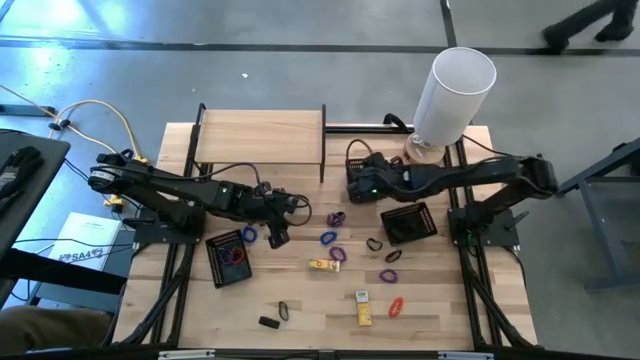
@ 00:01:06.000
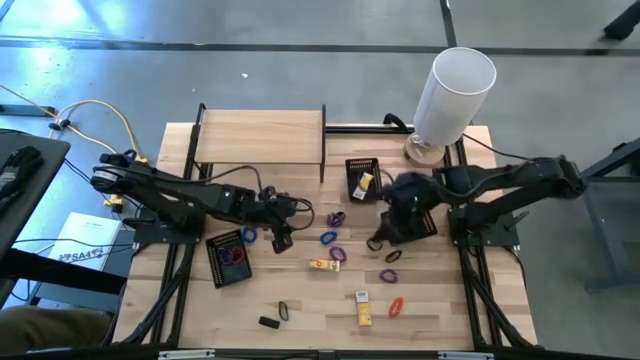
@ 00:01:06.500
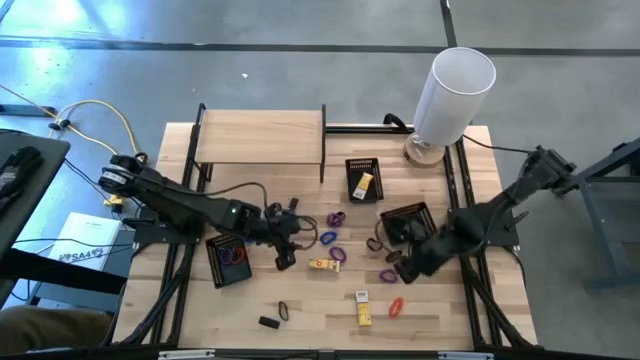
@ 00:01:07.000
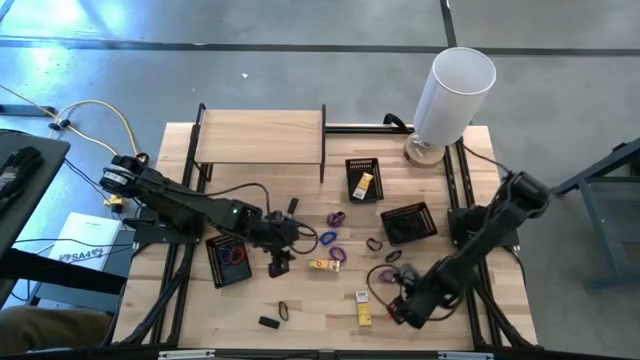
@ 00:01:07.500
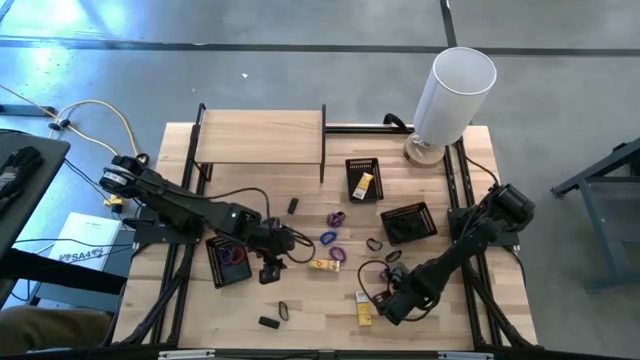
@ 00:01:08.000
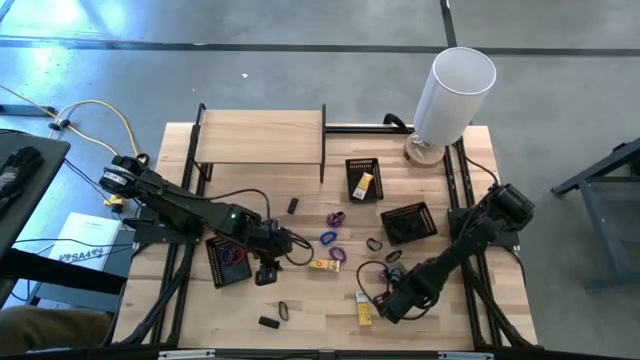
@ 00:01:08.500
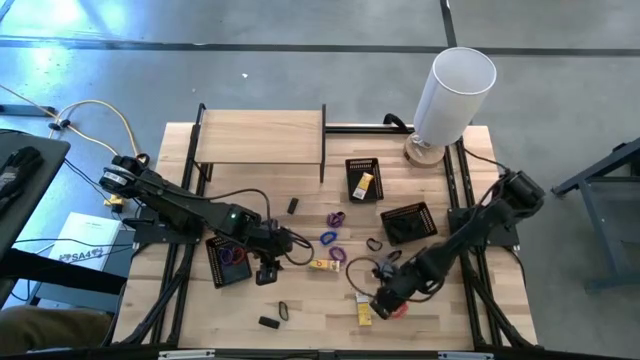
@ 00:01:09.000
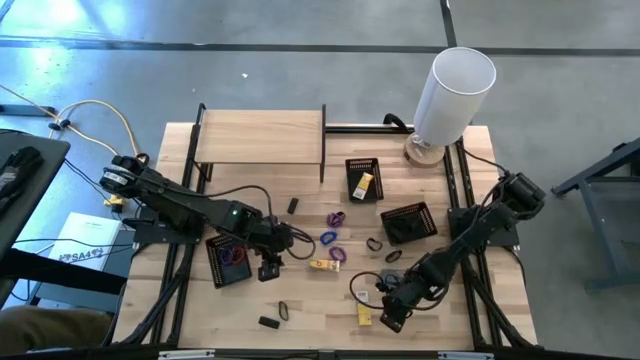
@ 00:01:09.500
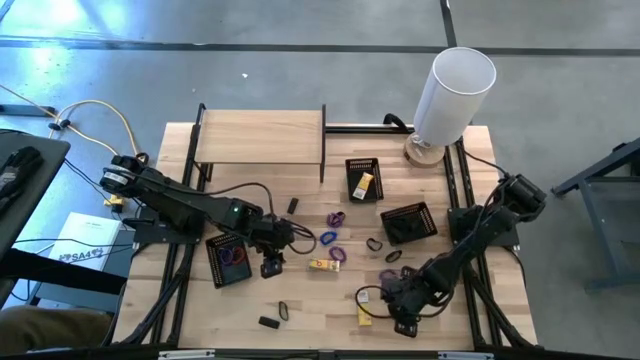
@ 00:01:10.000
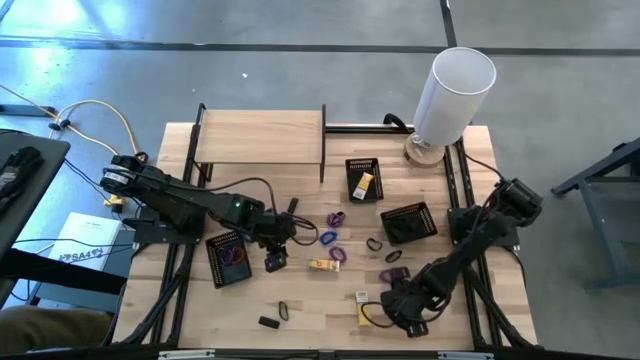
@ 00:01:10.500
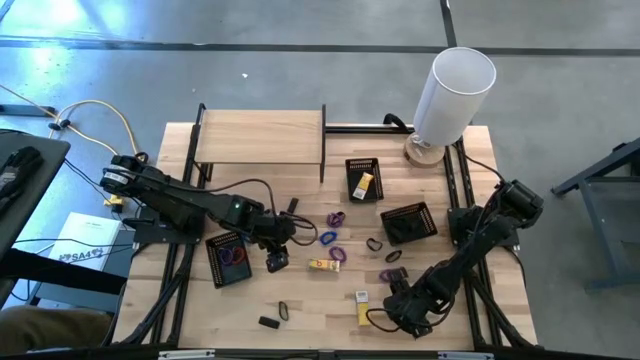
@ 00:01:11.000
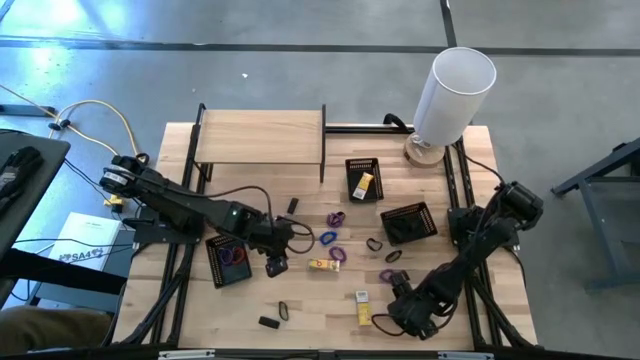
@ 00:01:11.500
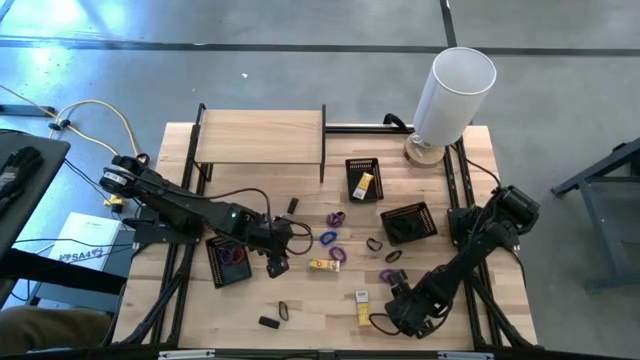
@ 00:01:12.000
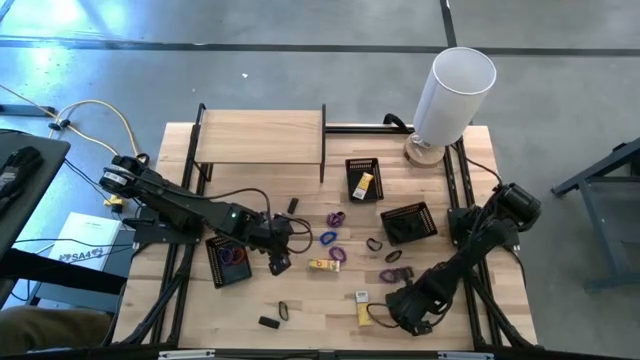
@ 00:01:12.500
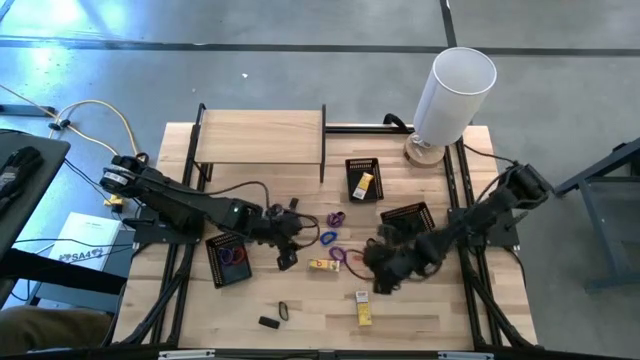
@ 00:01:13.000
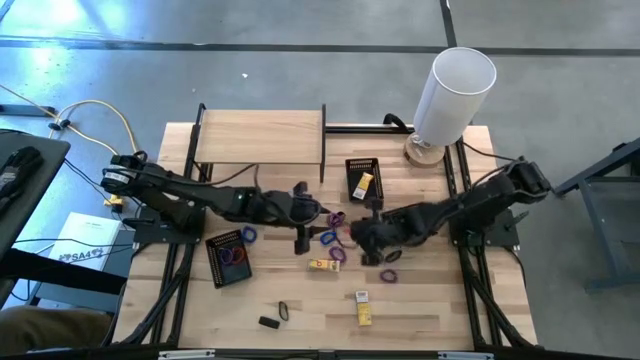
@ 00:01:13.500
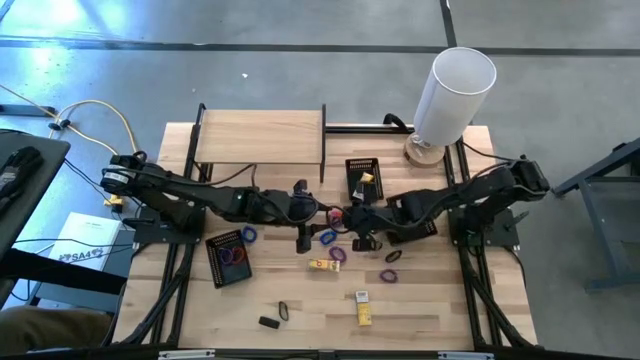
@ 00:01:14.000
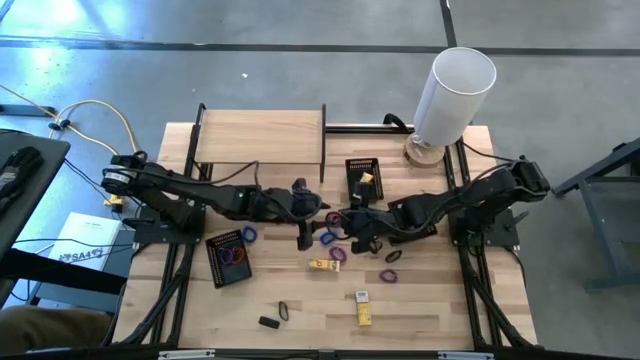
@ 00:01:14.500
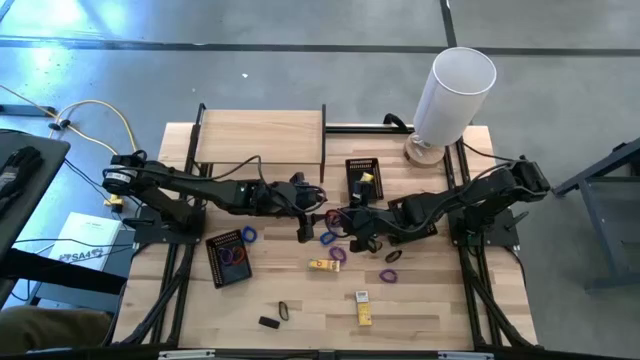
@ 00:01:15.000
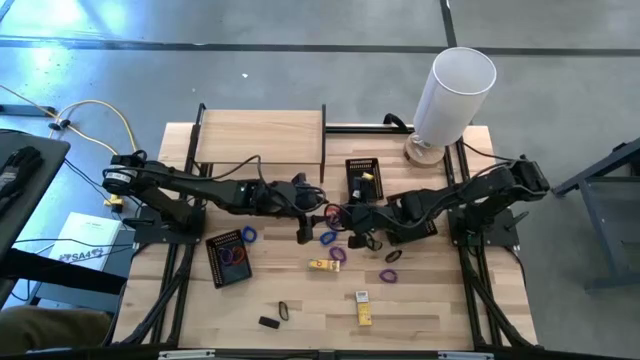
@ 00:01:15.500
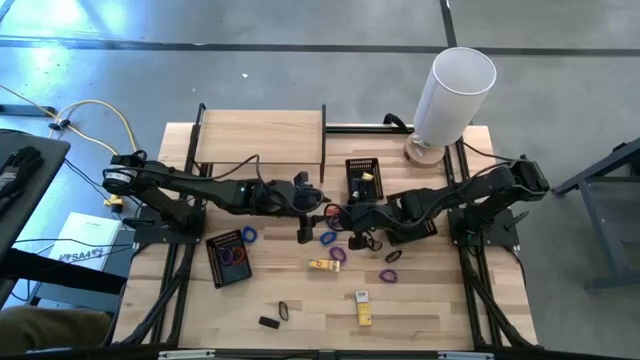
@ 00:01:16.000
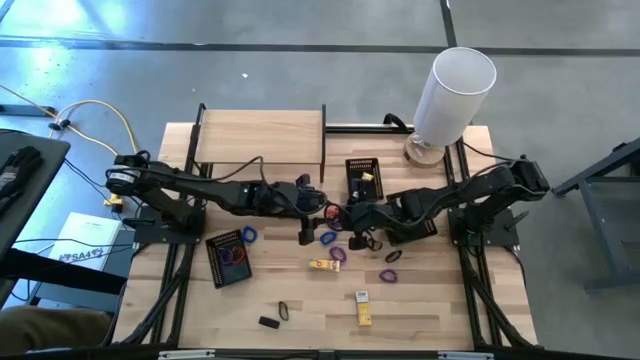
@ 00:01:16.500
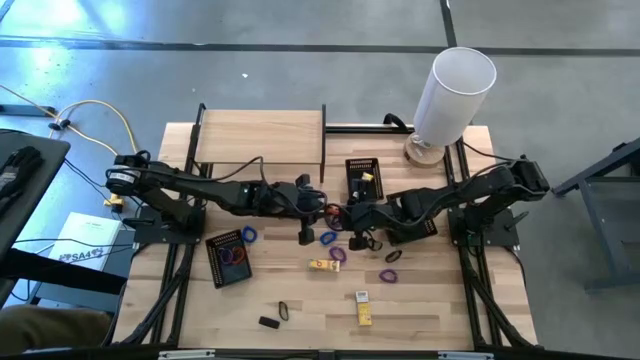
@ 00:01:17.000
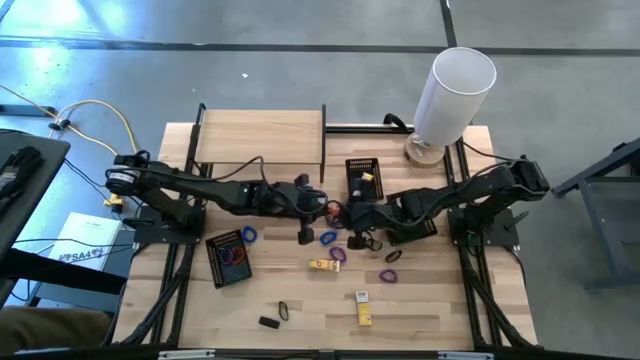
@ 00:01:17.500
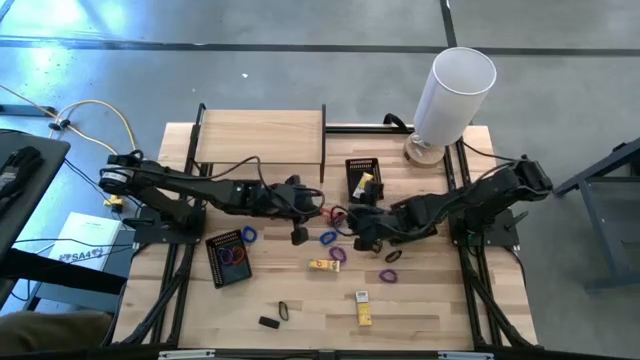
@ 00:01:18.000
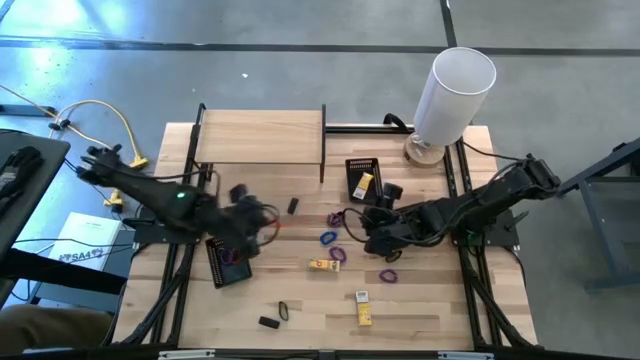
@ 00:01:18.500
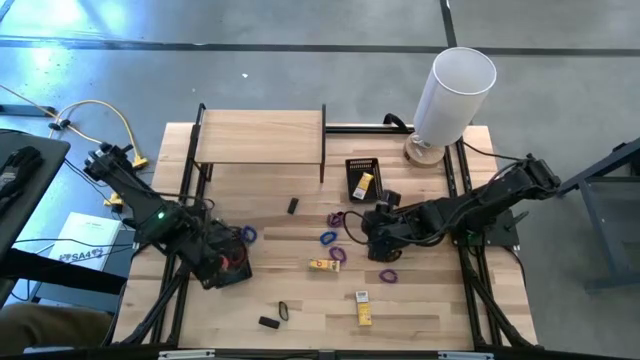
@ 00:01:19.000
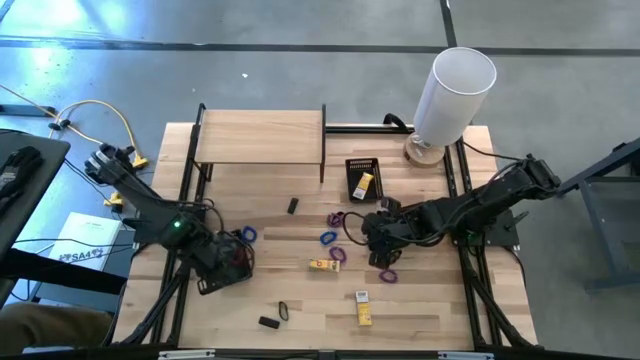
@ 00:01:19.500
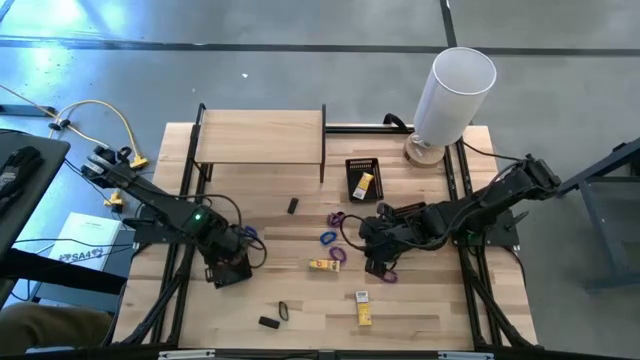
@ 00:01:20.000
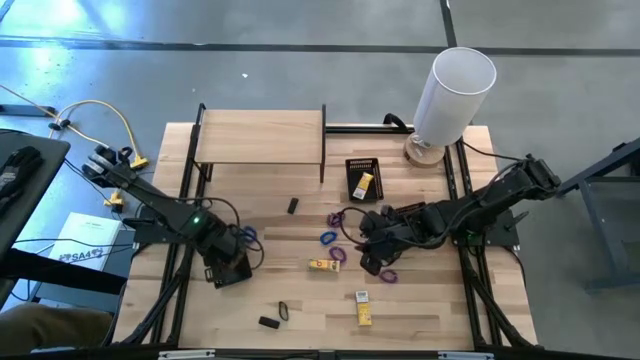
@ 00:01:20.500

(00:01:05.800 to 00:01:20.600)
Task: Pick & Place Office Desk Supplies
Put the orange spring keychain into the bottom left black bin

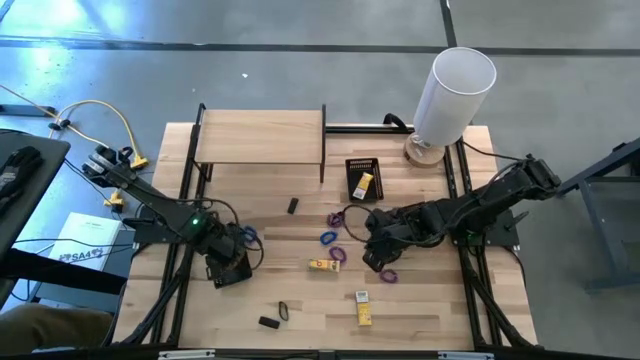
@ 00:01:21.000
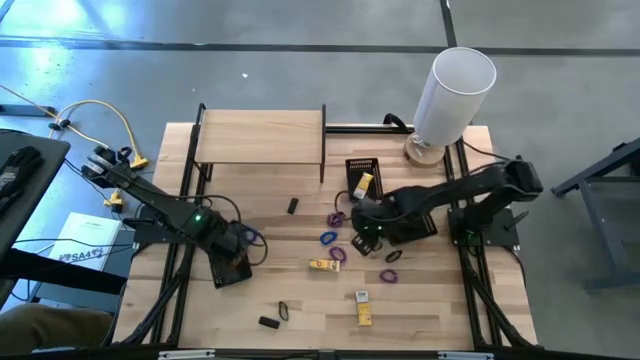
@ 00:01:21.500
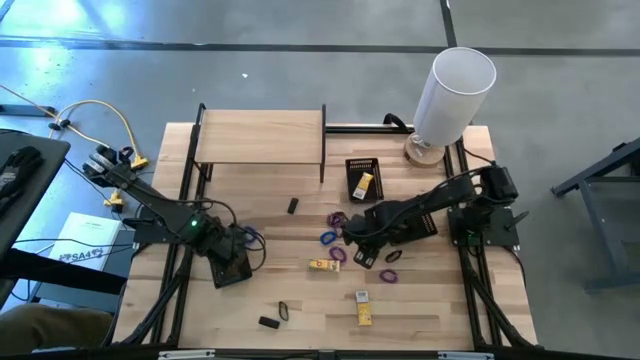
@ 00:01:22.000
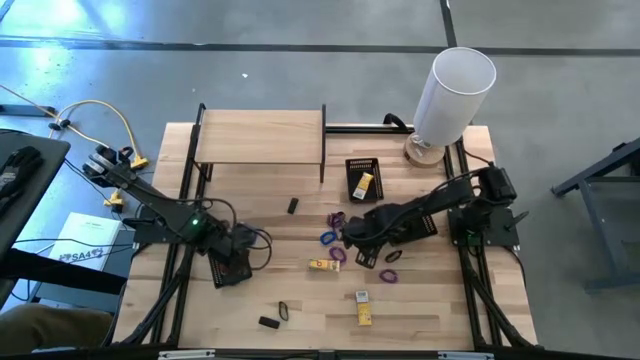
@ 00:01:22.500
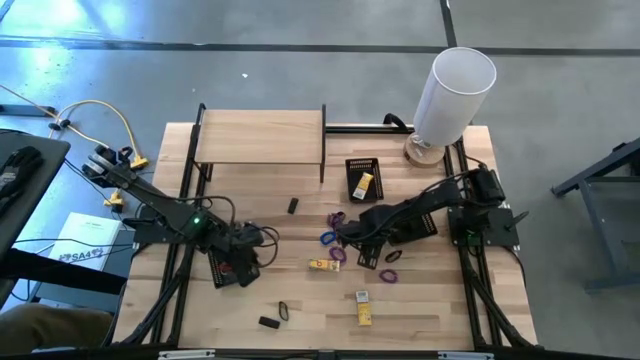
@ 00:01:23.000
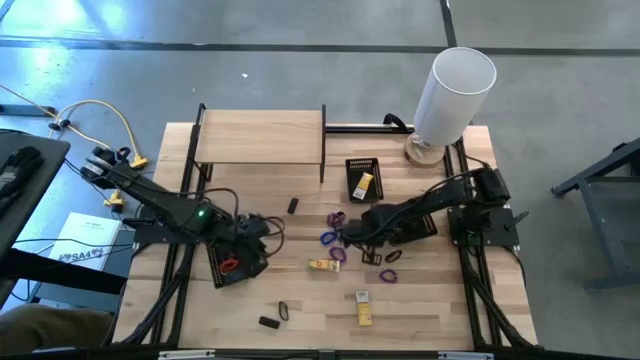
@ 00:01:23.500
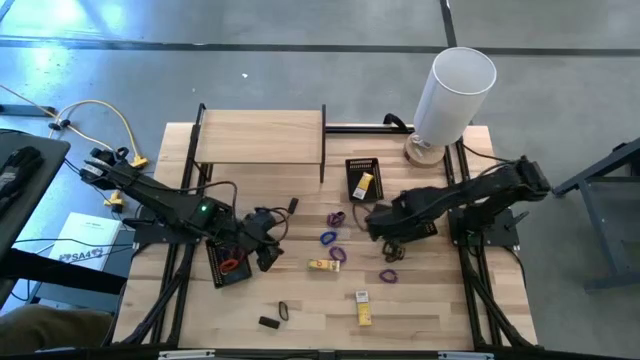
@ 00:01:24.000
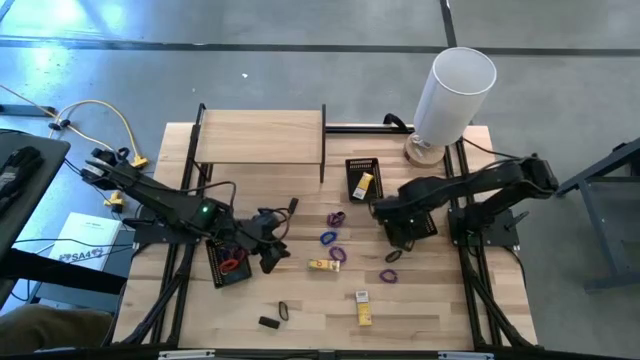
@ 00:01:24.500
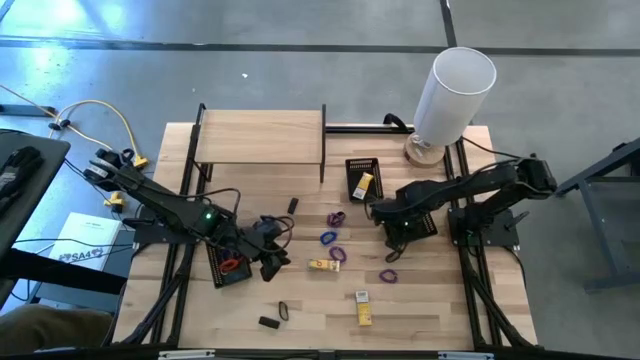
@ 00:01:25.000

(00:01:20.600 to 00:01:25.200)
Put the black rubberband into the bottom right black bin
